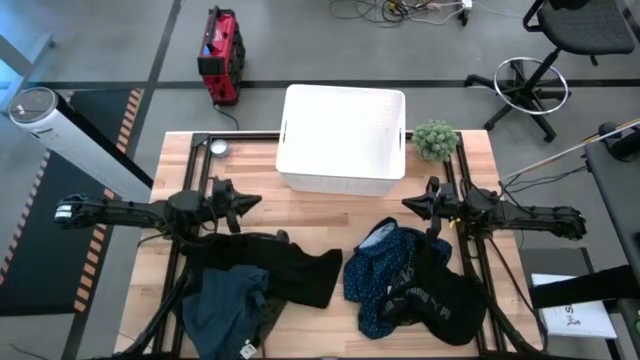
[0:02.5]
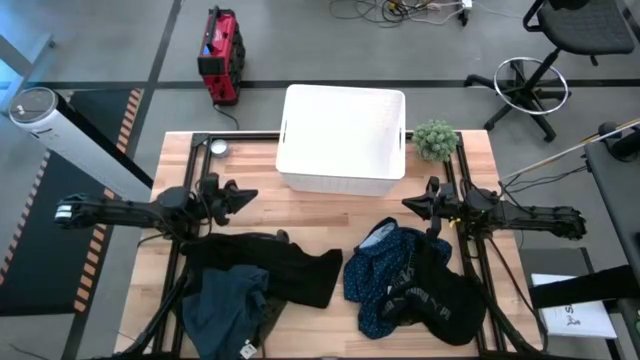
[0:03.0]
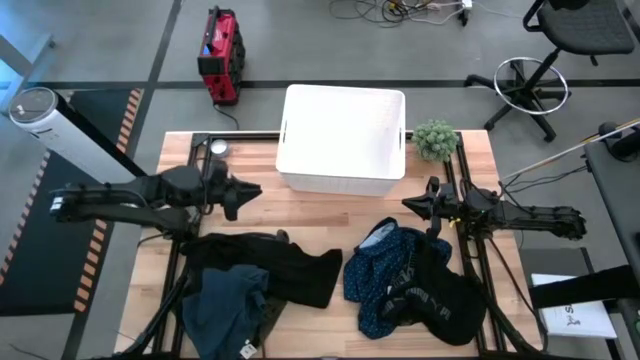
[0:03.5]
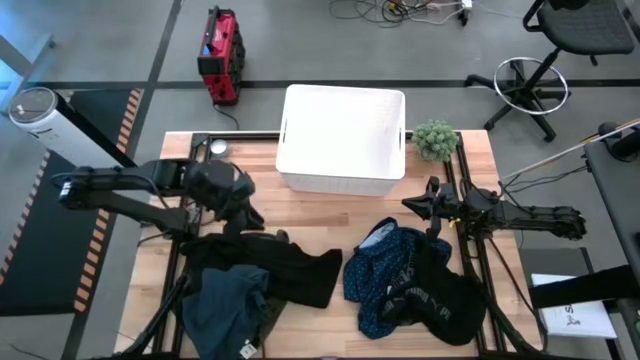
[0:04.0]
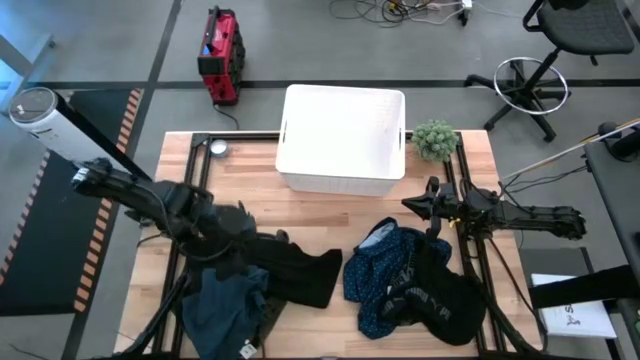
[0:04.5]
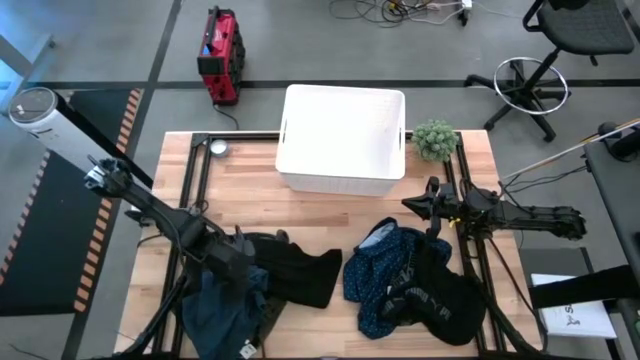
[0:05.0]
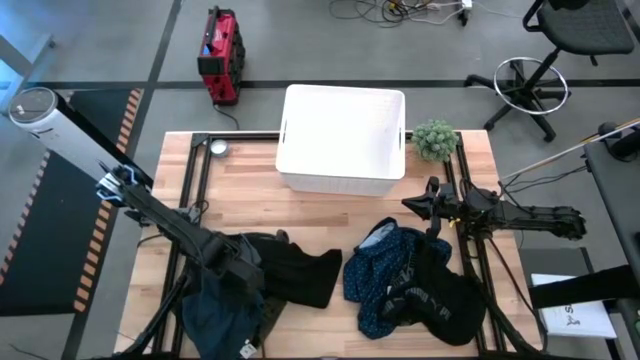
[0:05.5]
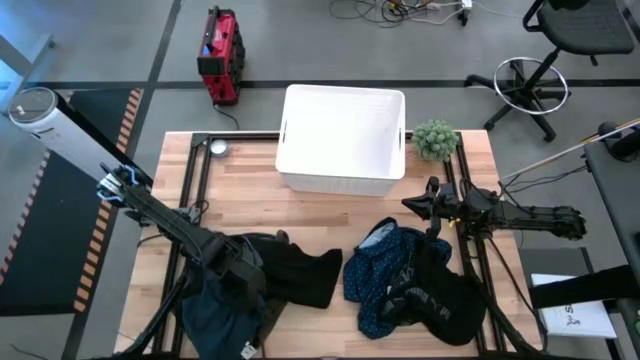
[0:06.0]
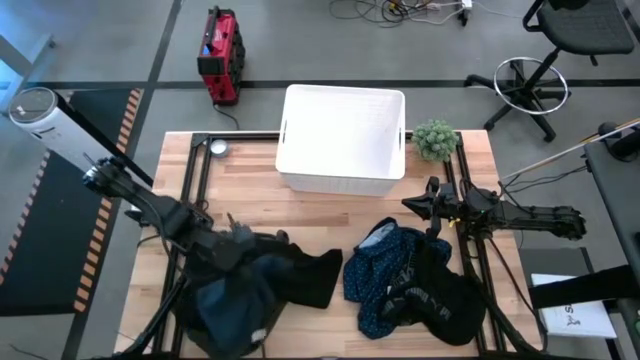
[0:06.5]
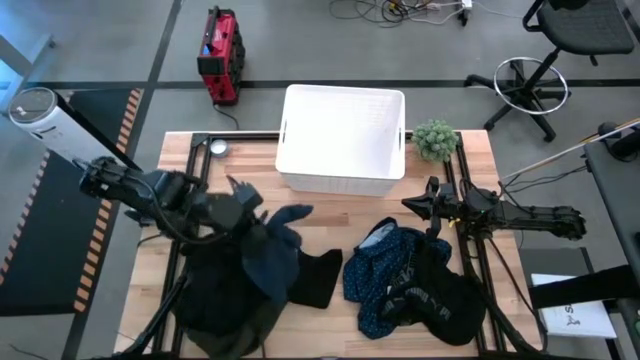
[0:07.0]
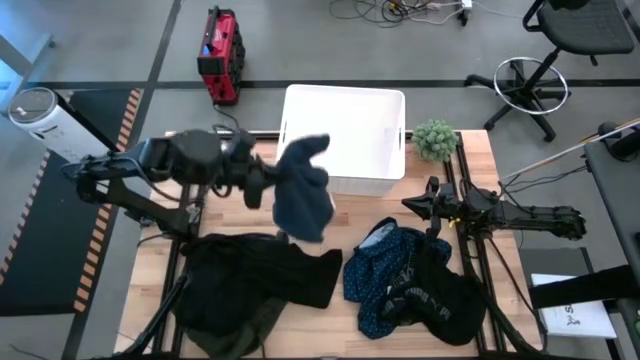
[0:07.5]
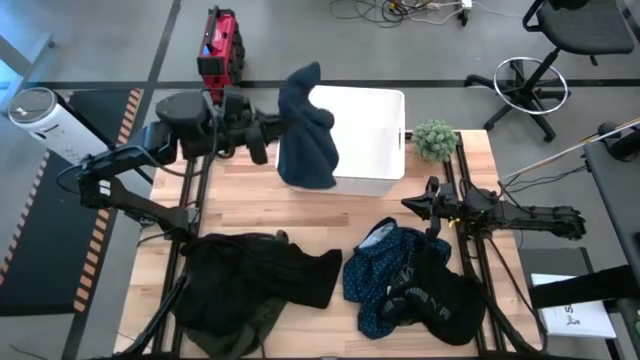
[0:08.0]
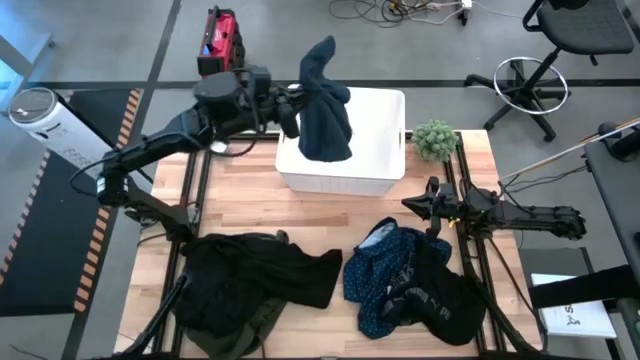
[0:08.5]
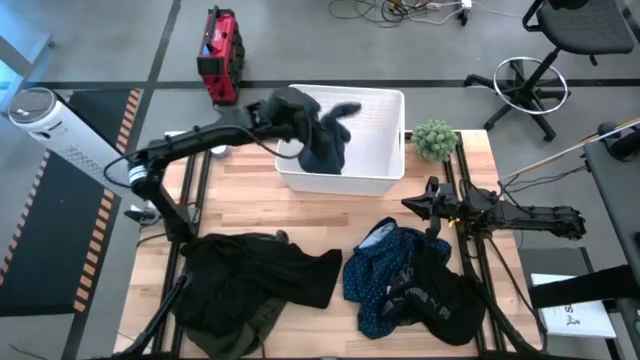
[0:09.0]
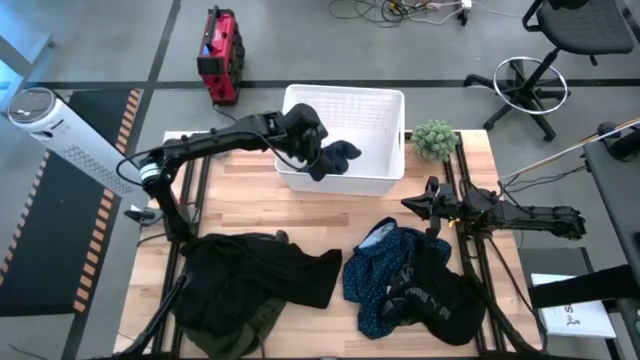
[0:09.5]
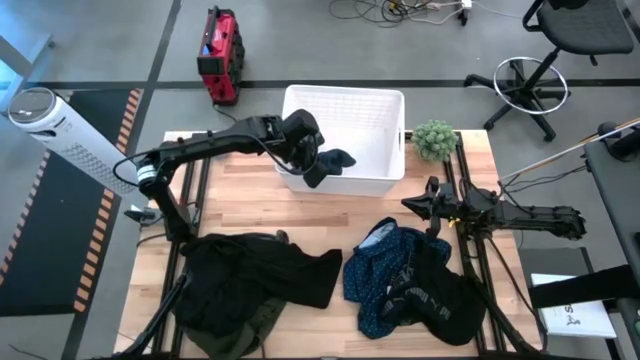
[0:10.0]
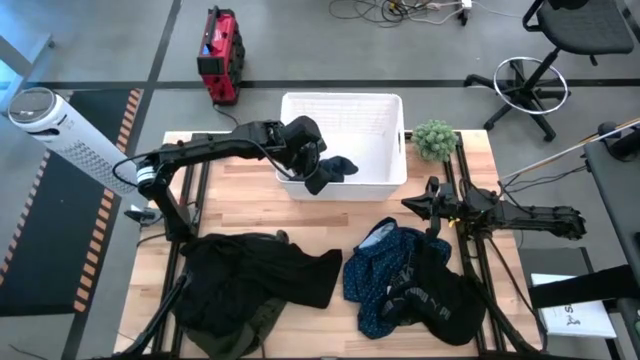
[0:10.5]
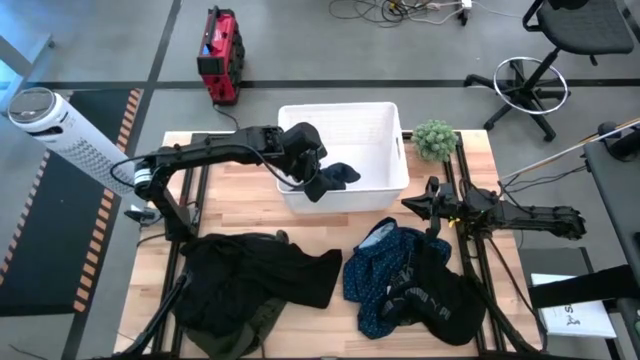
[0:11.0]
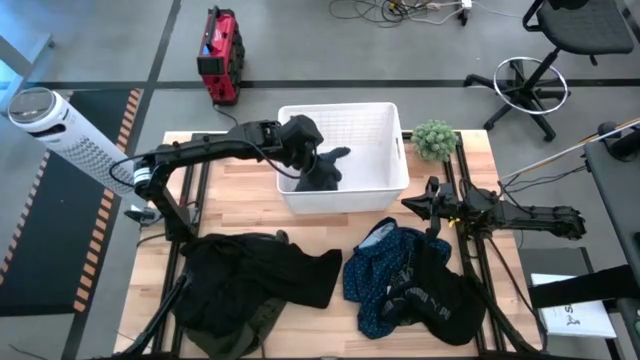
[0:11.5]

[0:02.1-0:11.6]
Task: Sort clothes
Put the dark blue shirt into the white bin

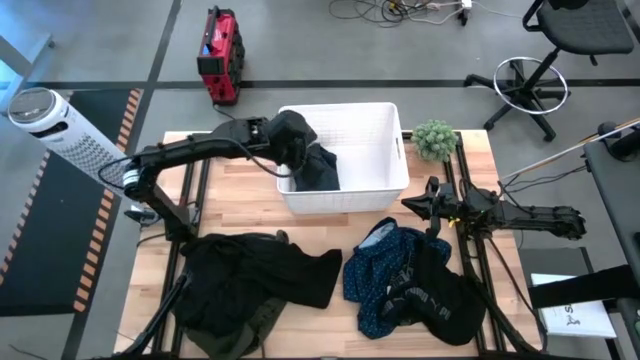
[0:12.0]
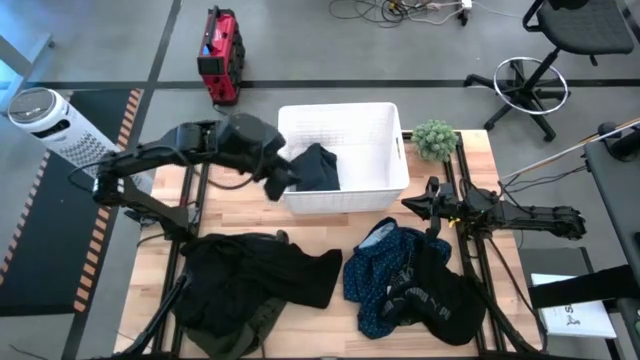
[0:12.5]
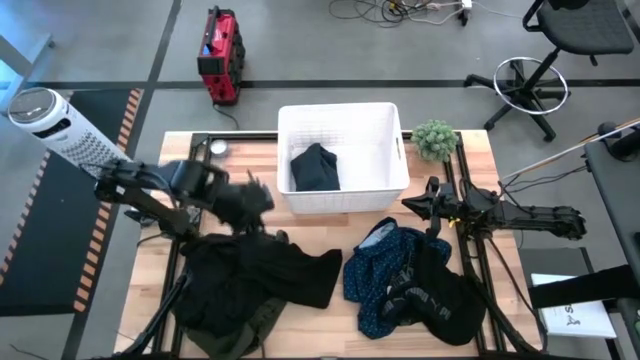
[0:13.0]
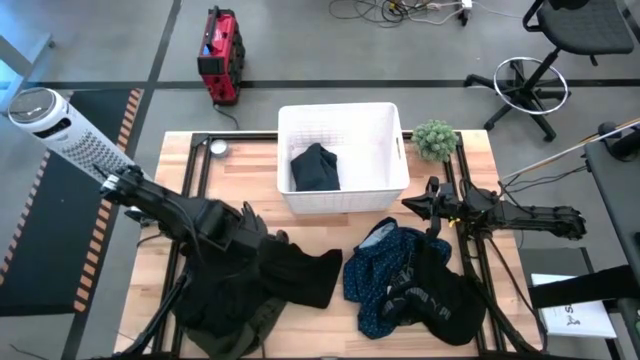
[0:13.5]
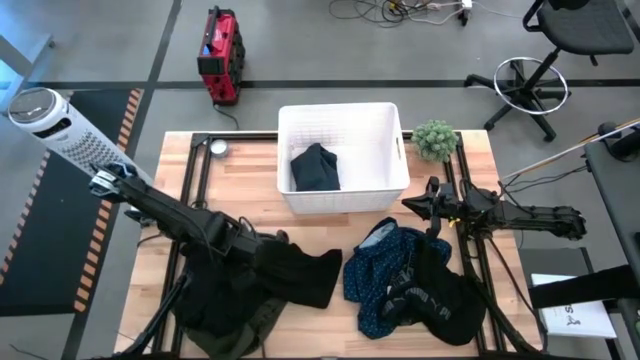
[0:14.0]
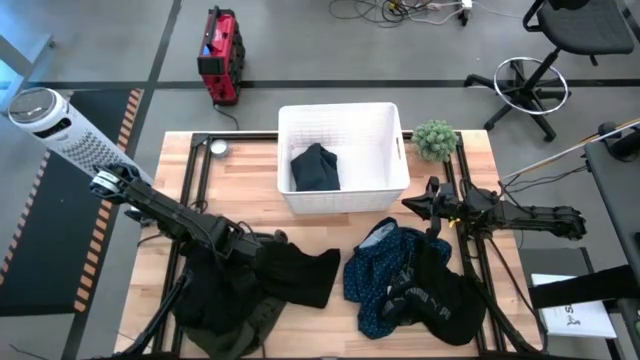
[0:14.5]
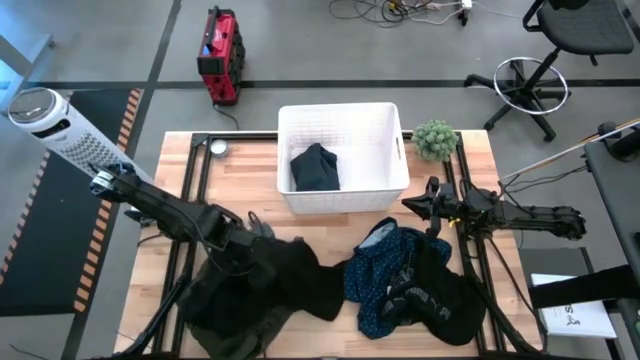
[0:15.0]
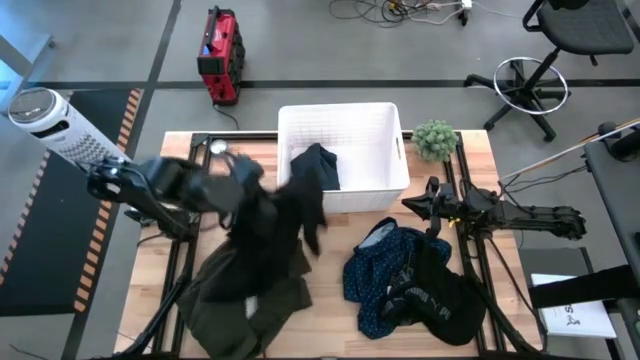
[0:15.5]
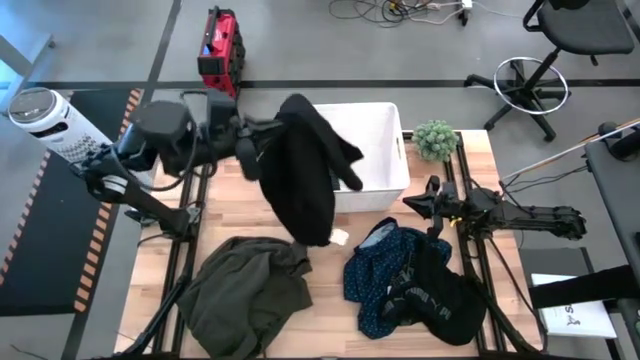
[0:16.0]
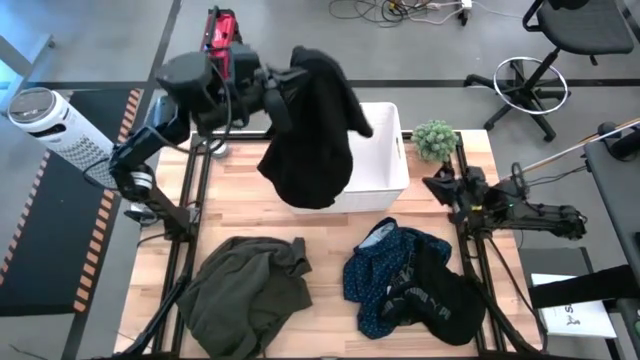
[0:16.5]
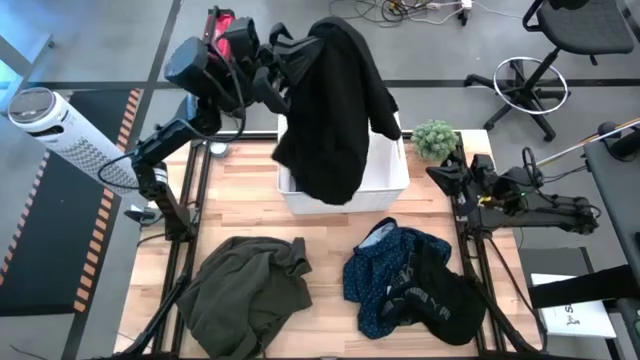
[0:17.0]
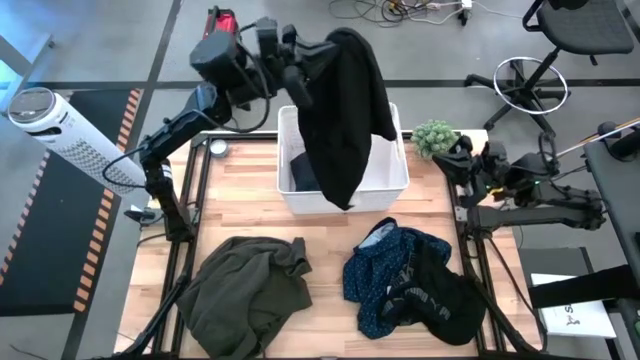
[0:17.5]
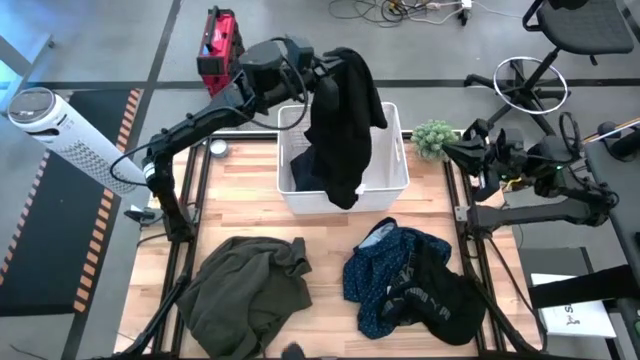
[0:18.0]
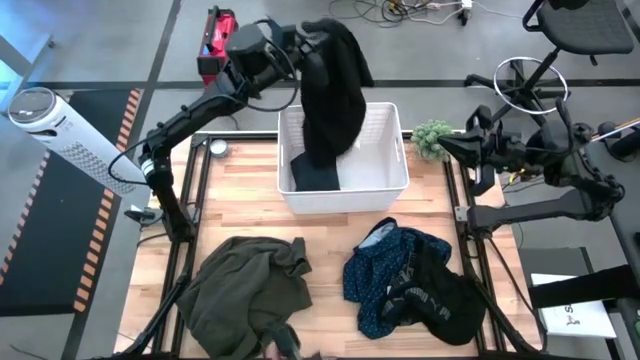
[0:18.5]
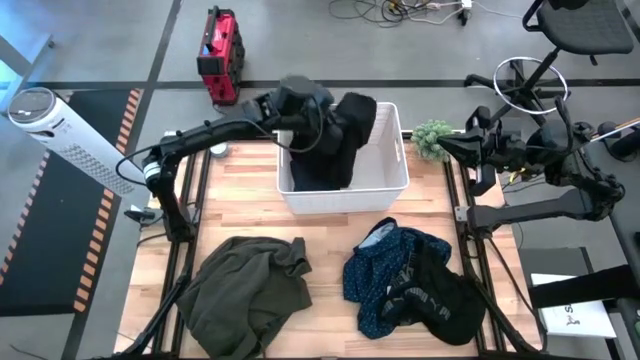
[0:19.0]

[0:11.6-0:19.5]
Put the black pants into the white bin

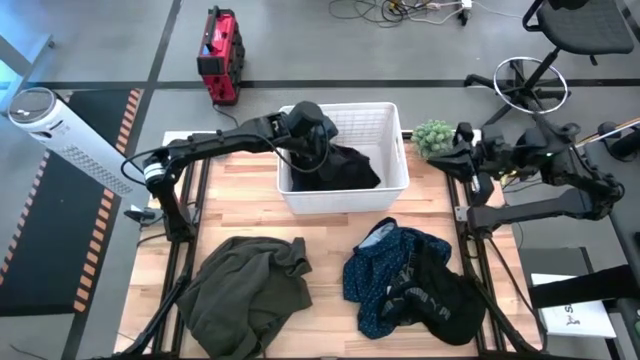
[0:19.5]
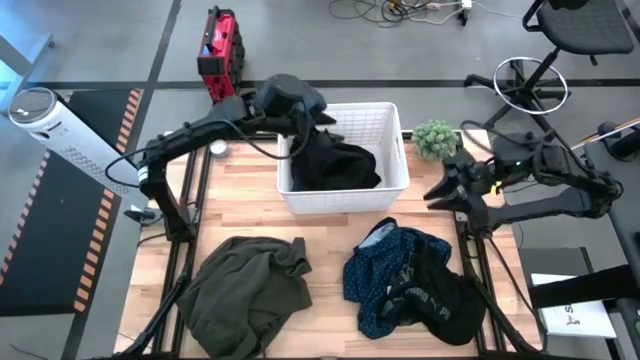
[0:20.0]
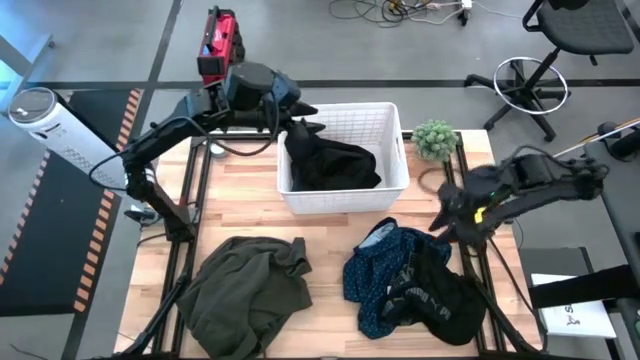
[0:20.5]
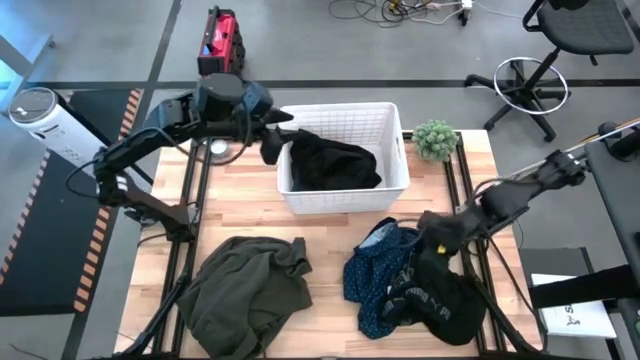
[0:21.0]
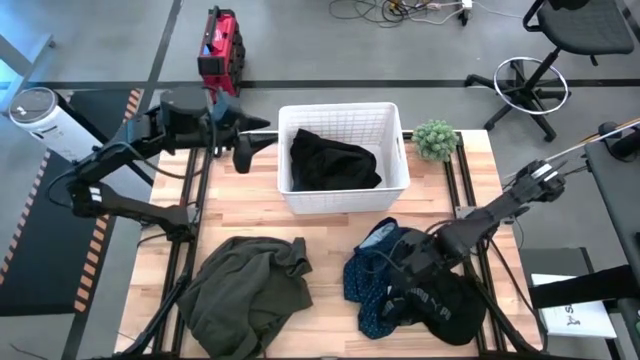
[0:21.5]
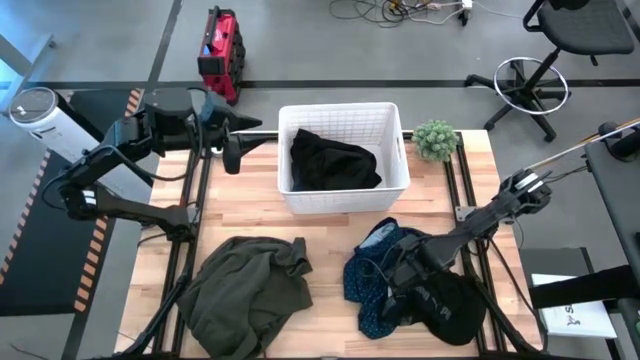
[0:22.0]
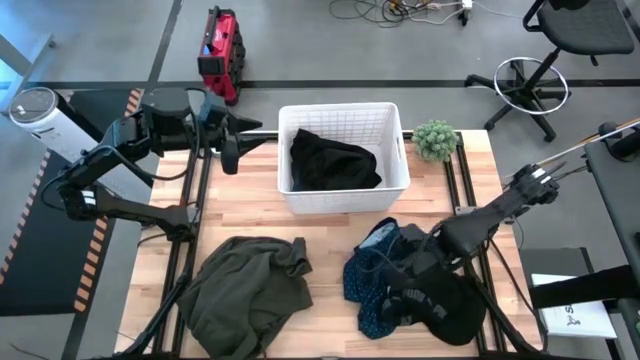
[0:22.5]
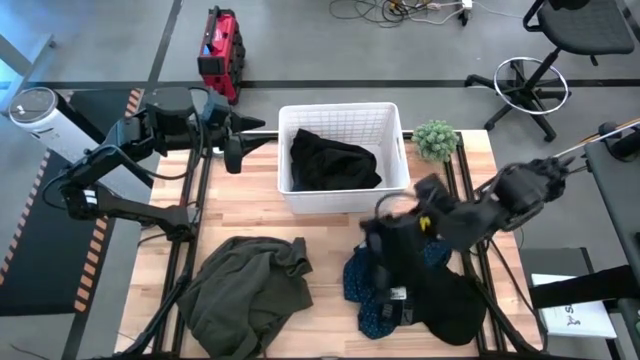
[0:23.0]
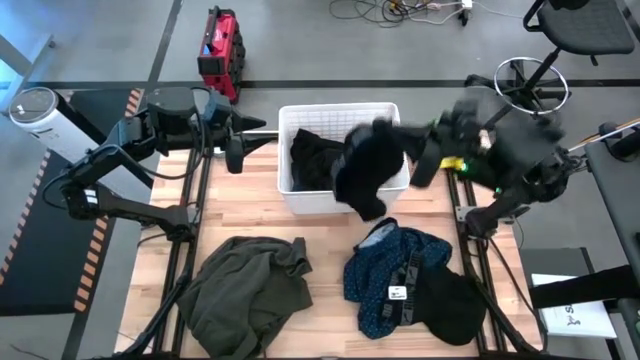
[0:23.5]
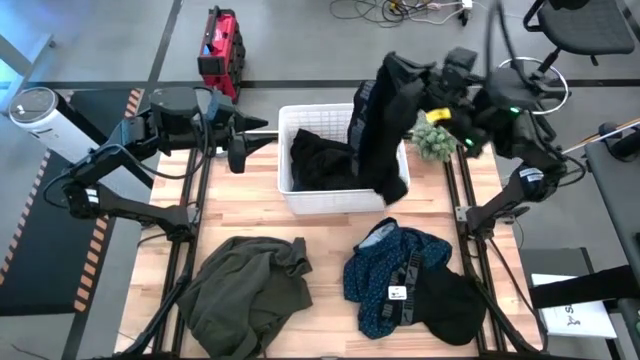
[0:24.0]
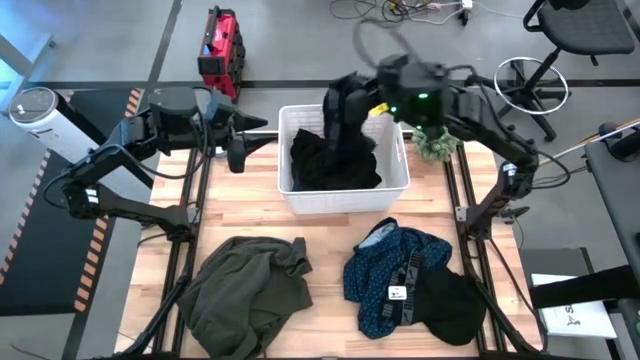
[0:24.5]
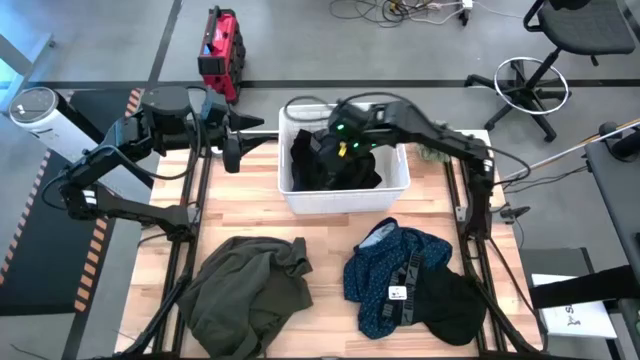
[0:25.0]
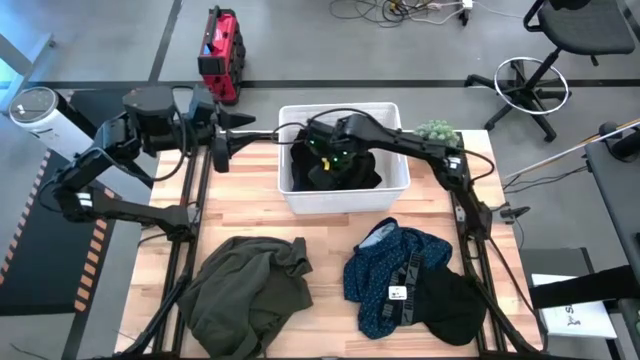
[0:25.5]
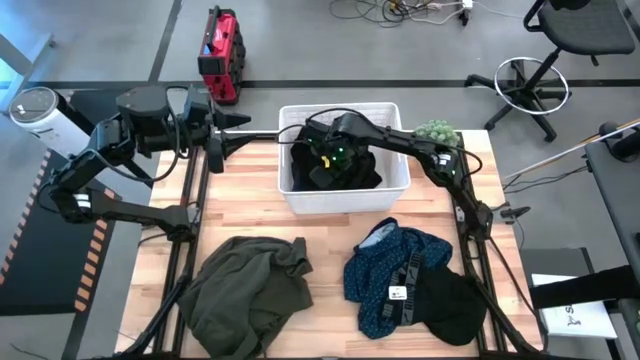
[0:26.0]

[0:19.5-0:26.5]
Put the black boxer into the white bin
